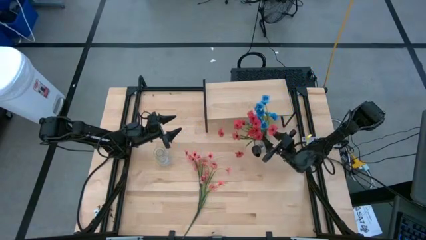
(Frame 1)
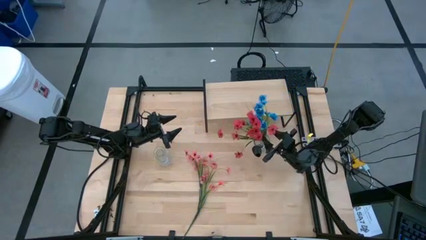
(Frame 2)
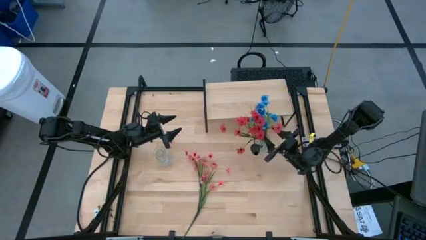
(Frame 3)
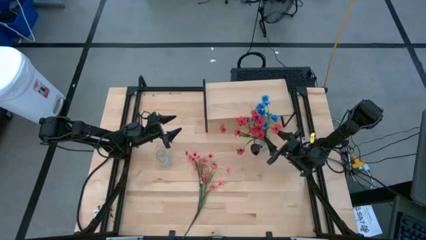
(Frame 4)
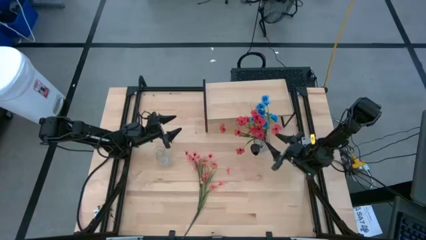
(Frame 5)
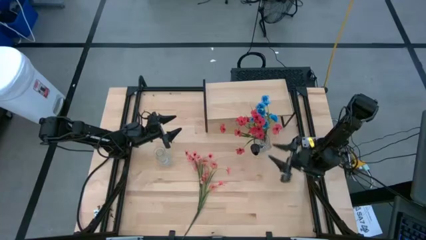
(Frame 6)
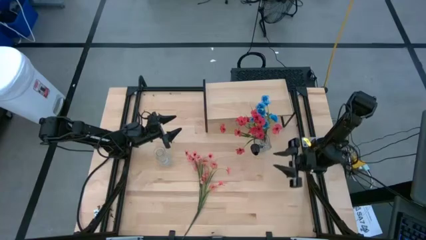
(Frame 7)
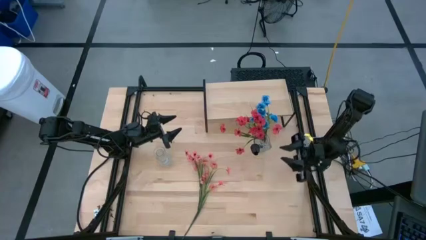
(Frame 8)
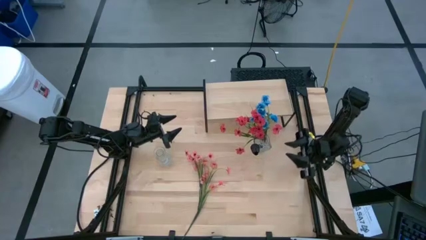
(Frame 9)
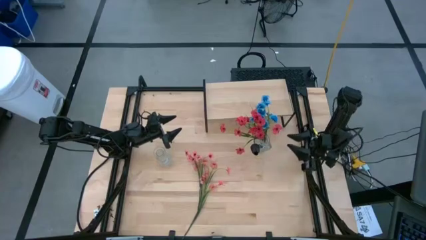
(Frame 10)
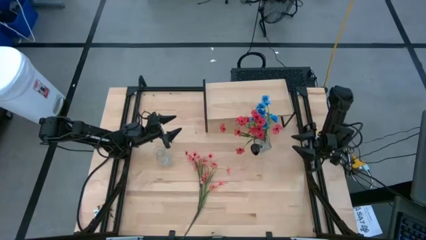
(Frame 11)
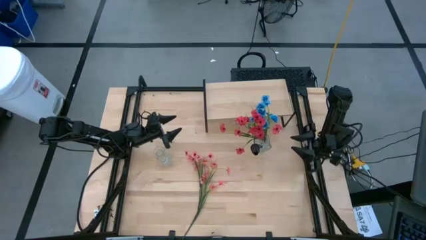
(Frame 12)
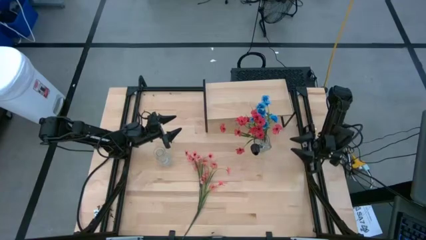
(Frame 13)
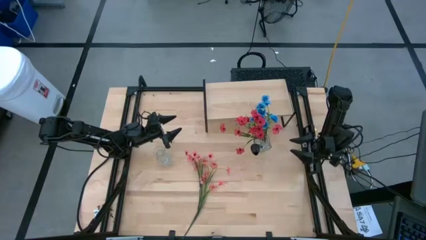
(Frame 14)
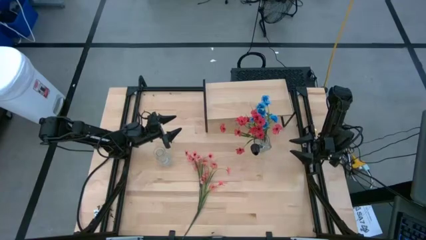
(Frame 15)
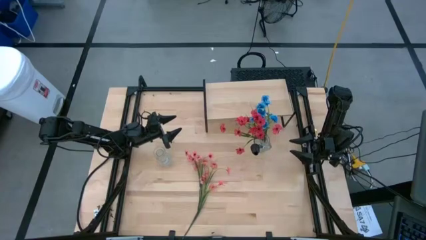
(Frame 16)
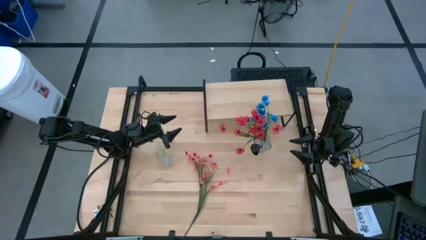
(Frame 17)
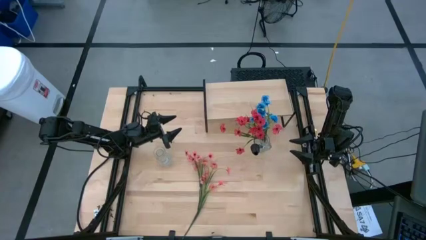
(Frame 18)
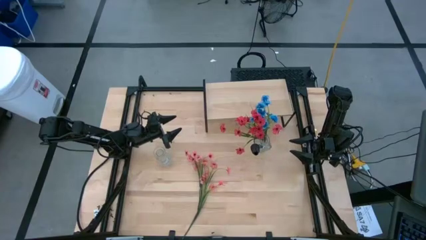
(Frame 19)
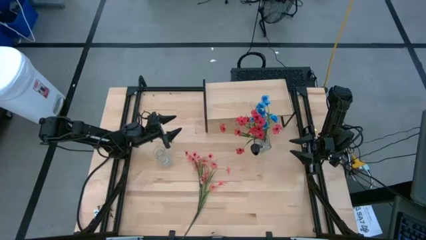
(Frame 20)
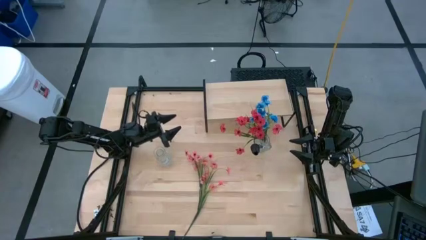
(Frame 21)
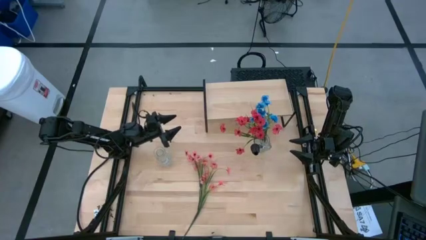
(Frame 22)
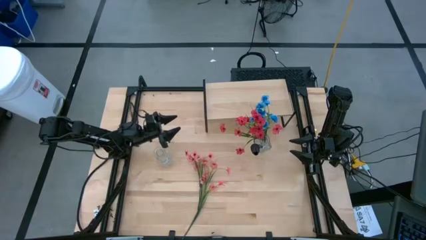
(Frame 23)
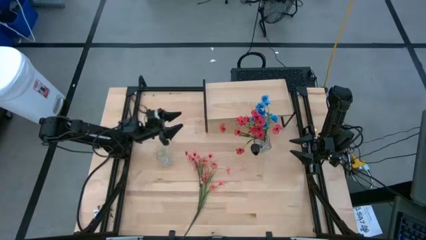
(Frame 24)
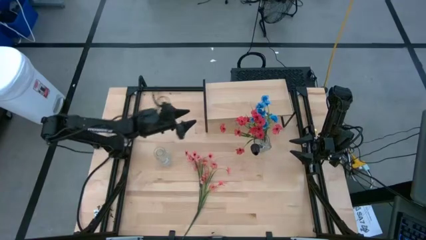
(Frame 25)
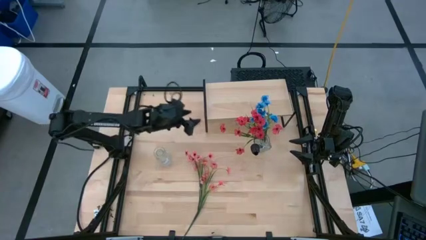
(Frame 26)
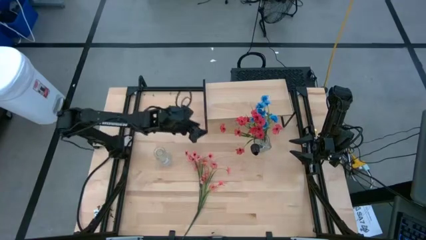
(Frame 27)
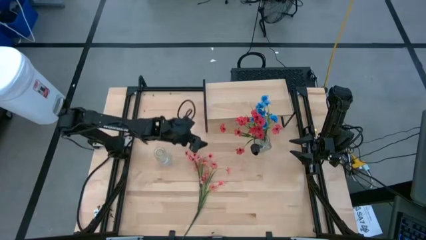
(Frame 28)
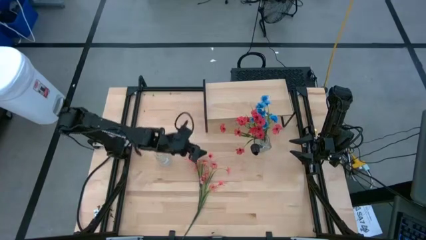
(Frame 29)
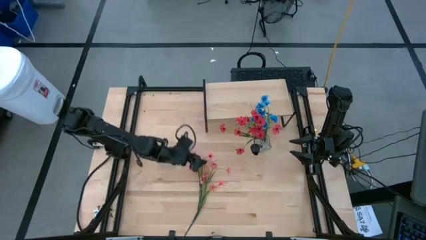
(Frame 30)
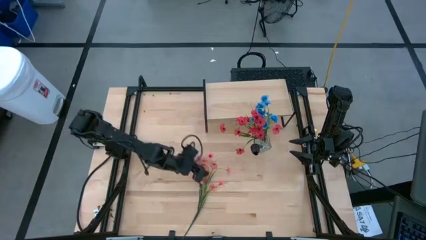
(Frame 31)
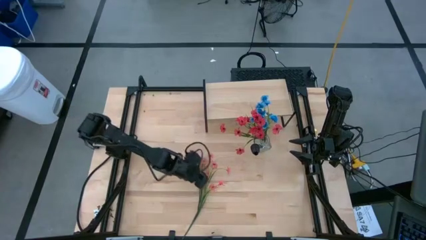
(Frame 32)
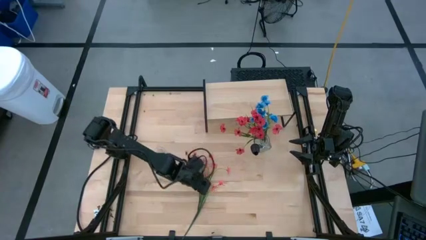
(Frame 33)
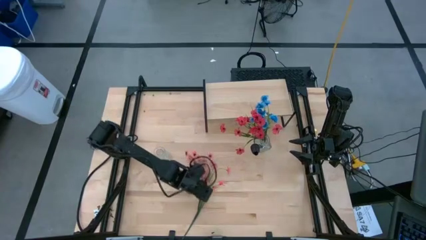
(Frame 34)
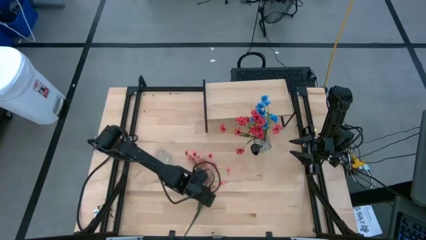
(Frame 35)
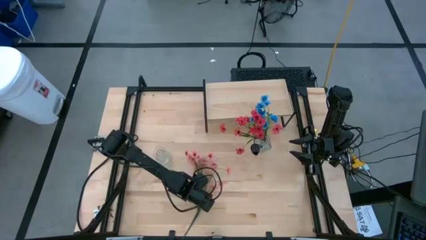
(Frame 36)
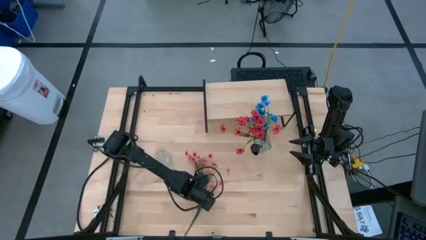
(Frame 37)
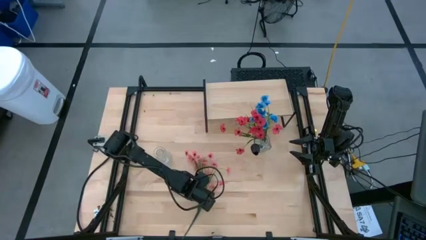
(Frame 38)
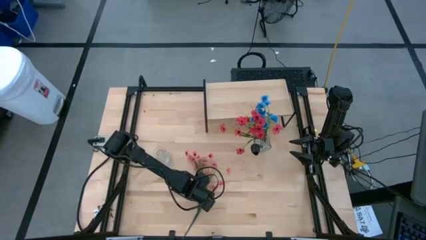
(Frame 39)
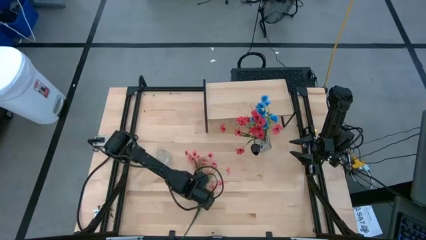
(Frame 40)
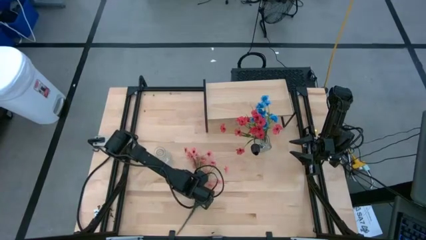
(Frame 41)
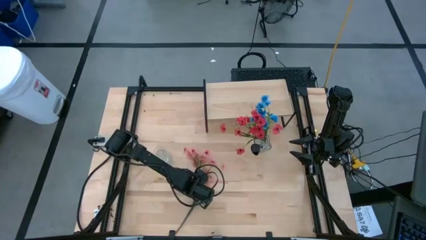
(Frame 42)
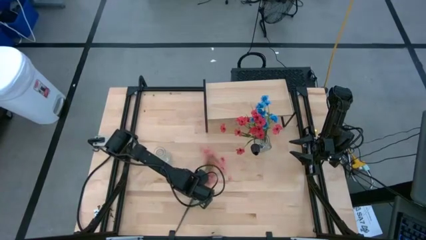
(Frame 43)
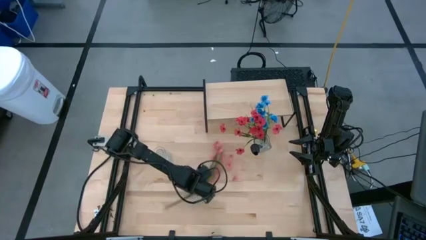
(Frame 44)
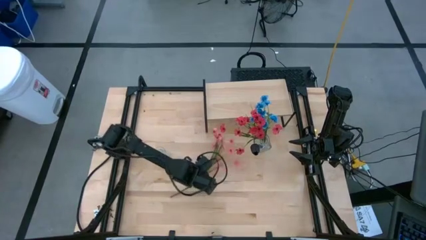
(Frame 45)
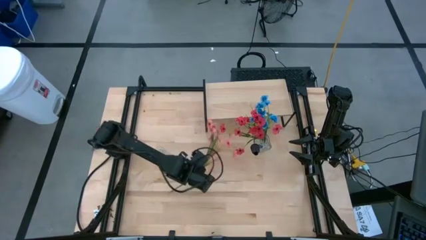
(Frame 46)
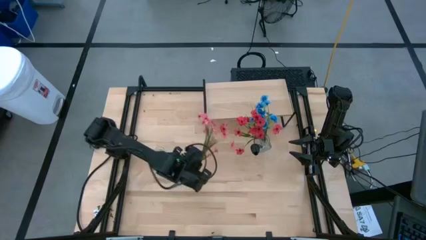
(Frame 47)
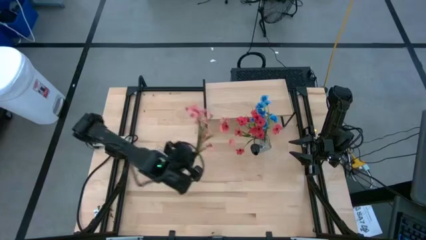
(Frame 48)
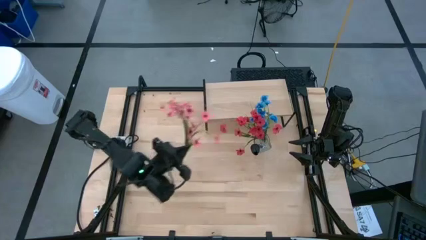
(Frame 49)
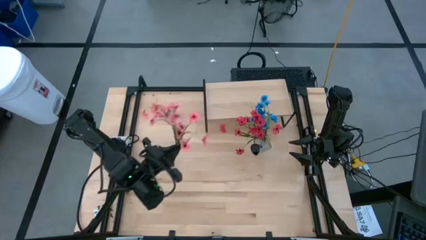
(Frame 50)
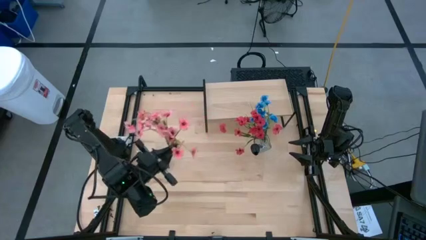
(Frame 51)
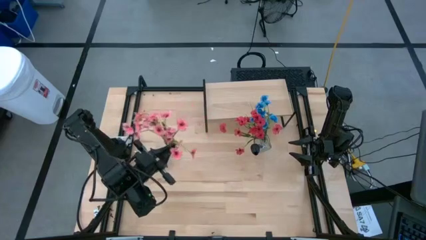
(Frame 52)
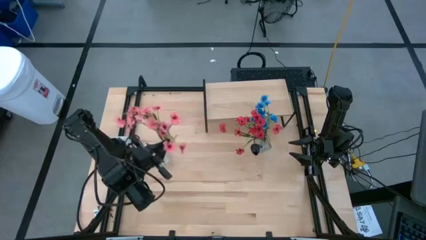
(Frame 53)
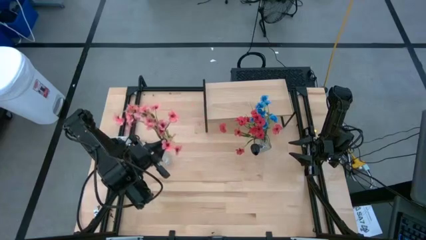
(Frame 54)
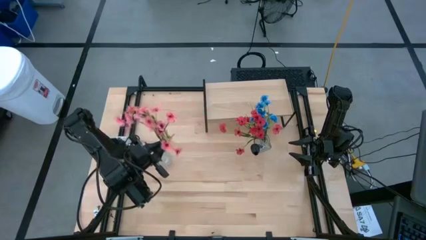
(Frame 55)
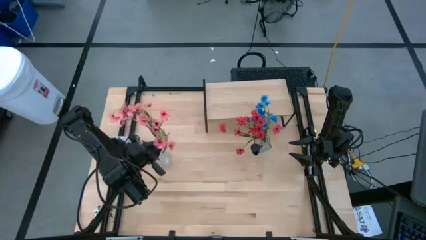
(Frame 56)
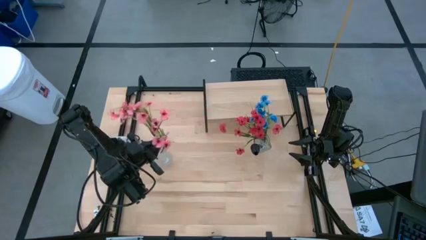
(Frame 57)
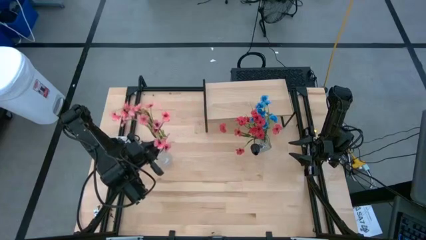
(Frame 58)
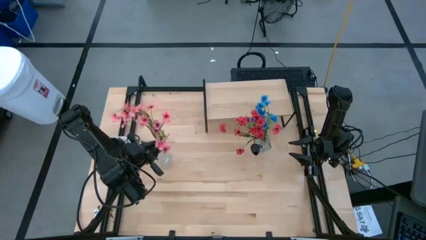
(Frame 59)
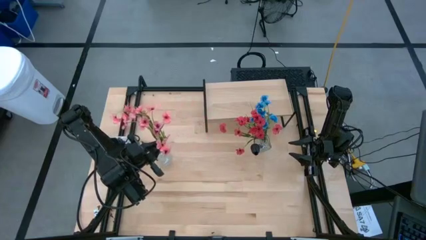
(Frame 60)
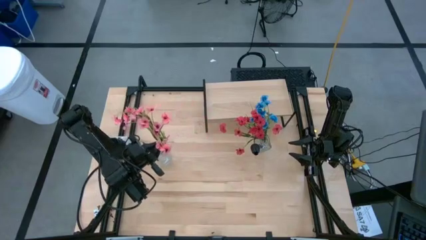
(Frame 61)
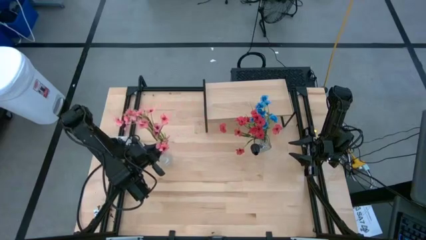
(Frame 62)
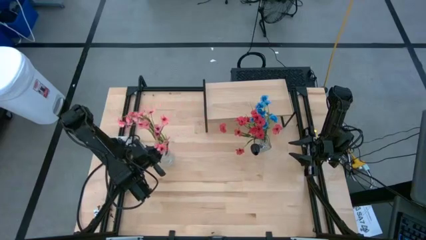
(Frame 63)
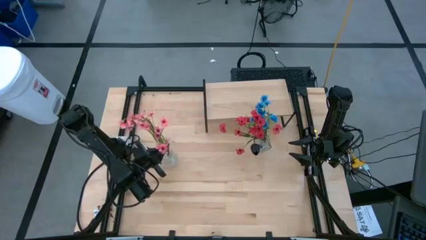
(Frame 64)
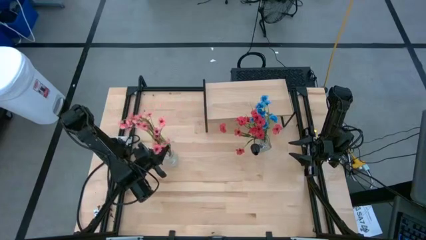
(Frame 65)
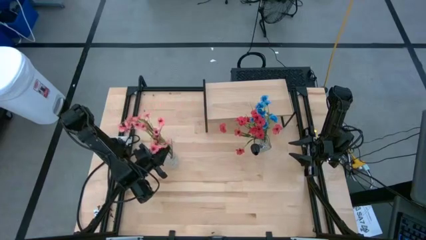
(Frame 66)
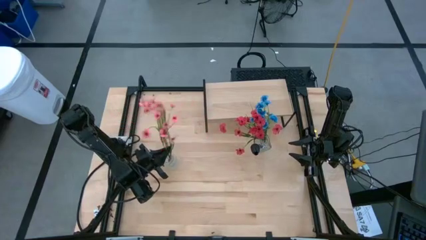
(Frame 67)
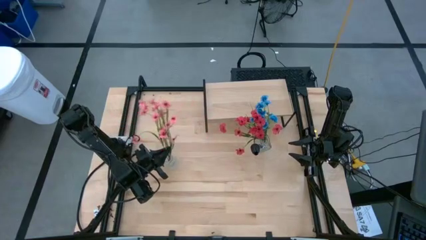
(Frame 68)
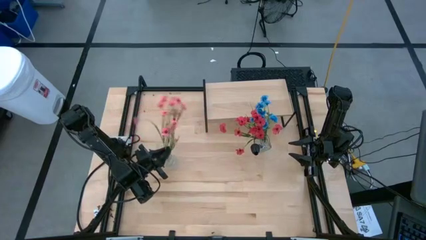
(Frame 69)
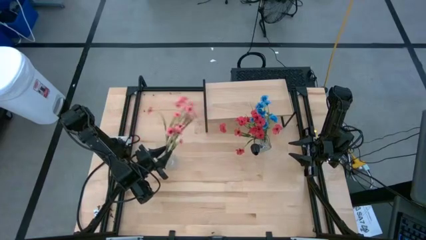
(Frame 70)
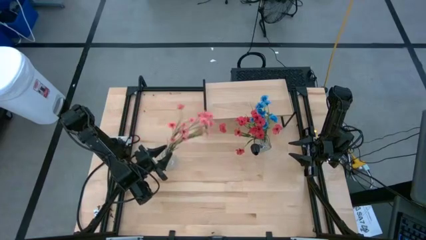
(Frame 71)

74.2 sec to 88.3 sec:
Task: Pick and place flowers into a vace then onto a shelf
Put the pink flowers into the left transparent vase

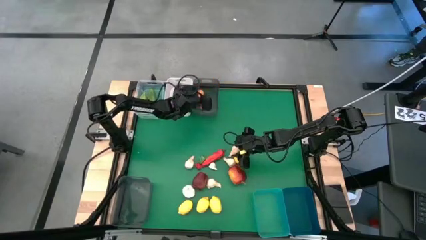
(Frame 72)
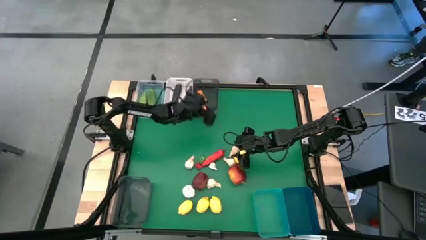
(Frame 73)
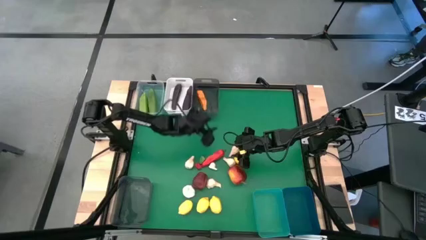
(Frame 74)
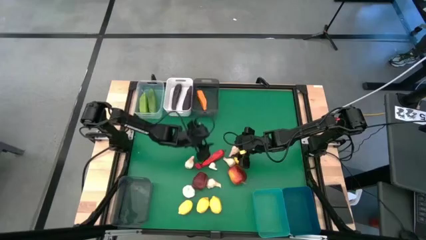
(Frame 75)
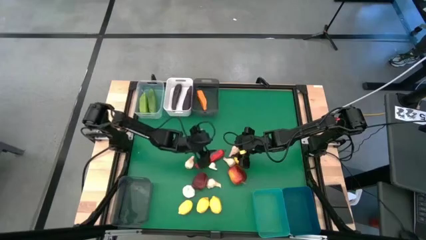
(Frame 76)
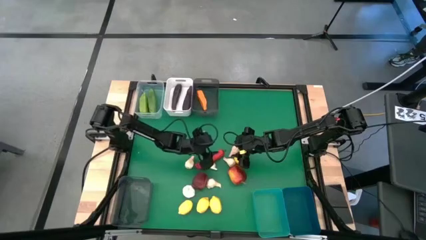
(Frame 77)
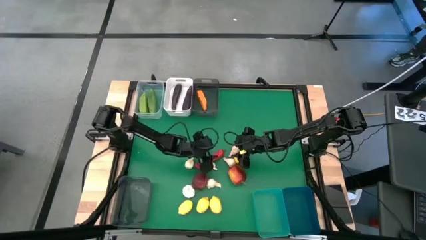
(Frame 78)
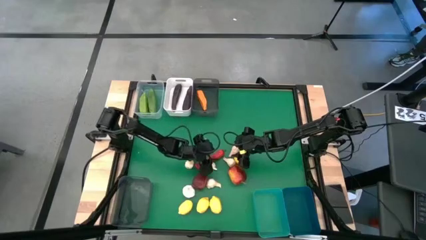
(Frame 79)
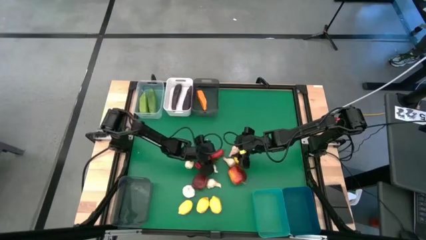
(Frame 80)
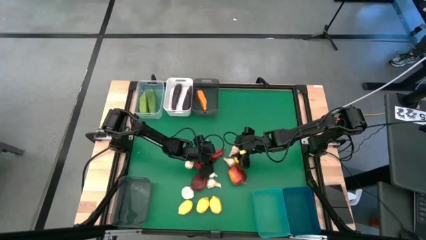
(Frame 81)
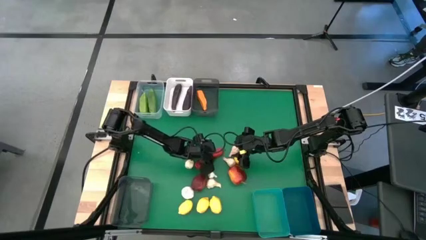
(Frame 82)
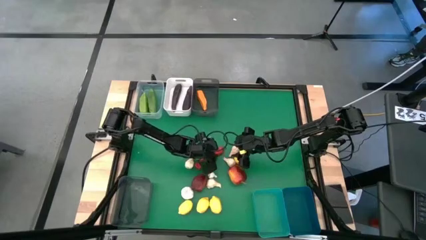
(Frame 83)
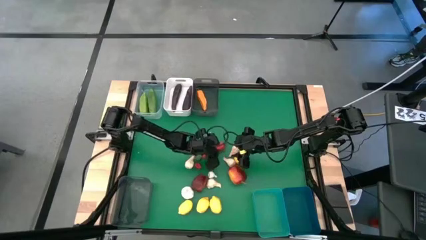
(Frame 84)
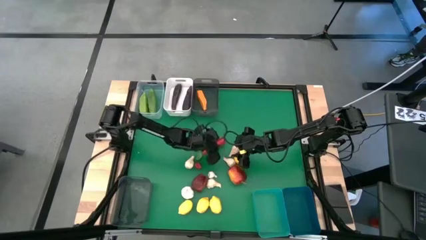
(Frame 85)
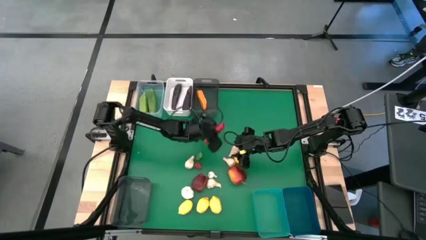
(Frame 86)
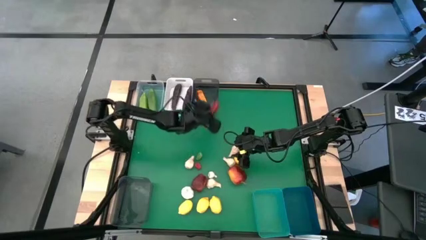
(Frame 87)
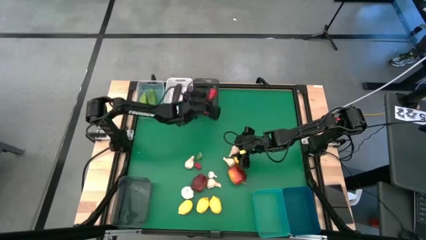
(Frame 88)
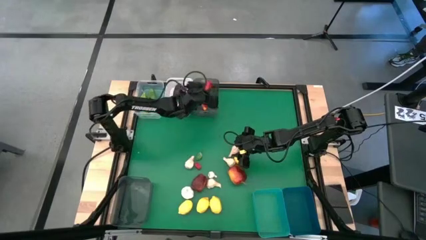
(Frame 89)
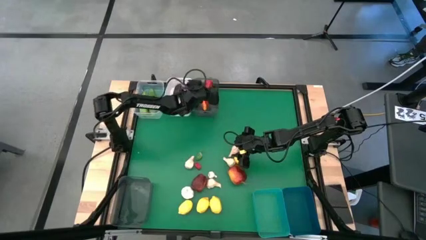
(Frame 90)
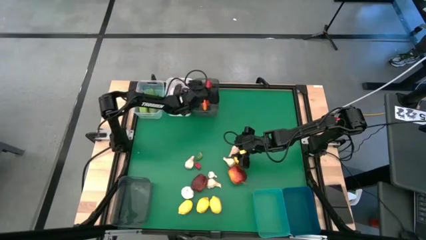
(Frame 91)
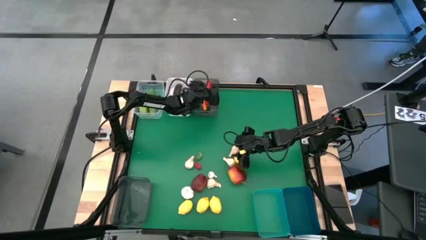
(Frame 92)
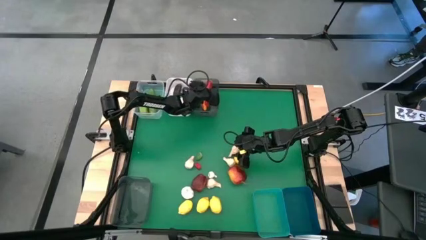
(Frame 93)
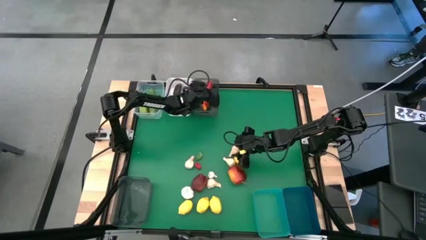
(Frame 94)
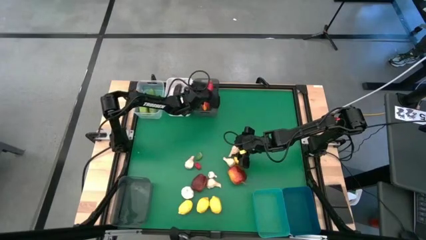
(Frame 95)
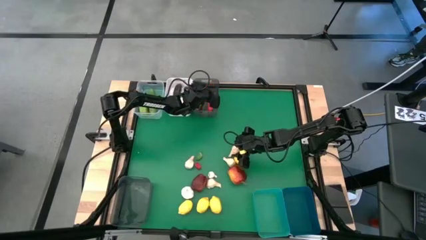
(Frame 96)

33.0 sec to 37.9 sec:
Task: Sort produce into baskets
Put the red chili pepper into the top black bin
